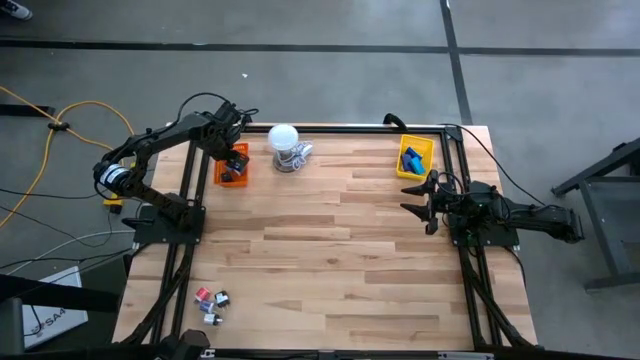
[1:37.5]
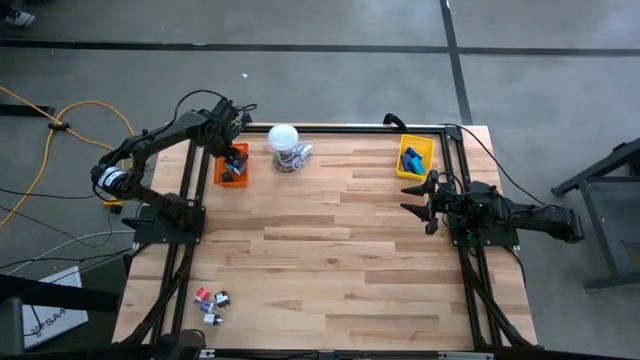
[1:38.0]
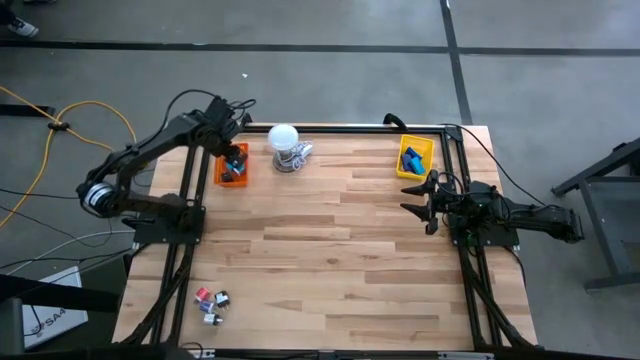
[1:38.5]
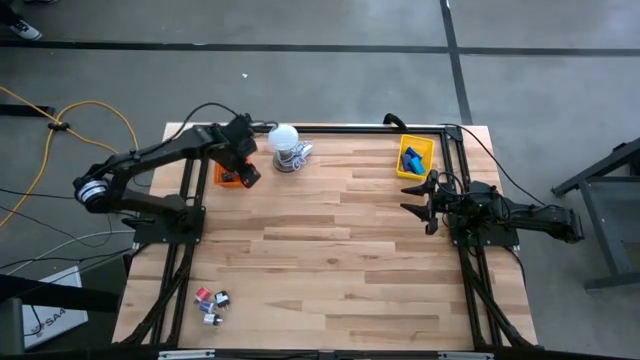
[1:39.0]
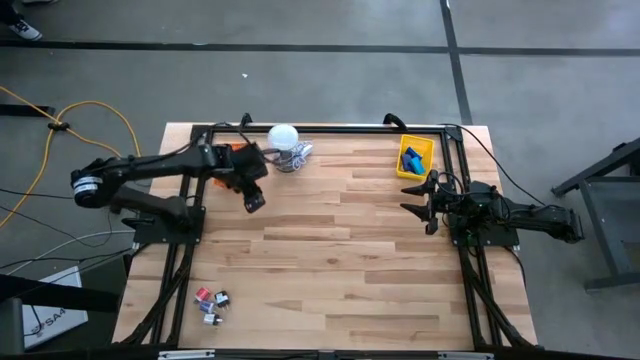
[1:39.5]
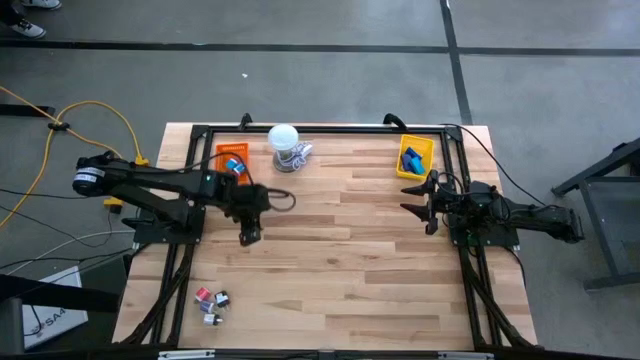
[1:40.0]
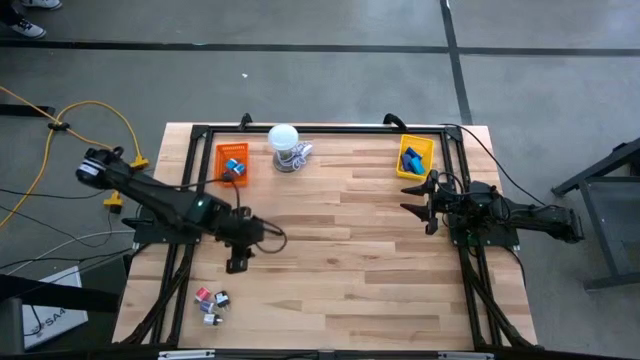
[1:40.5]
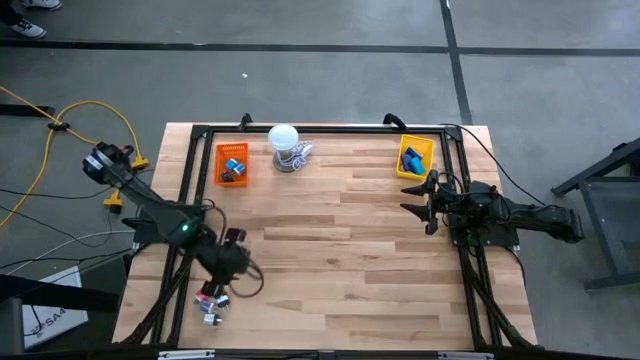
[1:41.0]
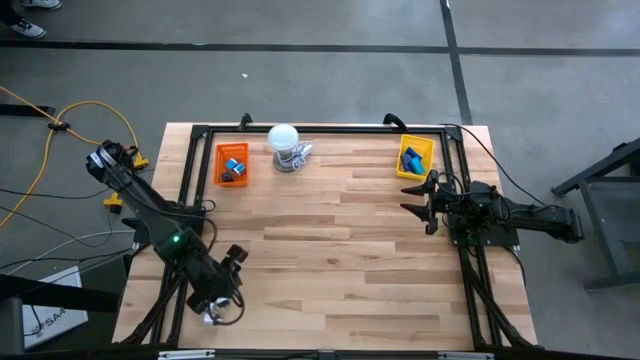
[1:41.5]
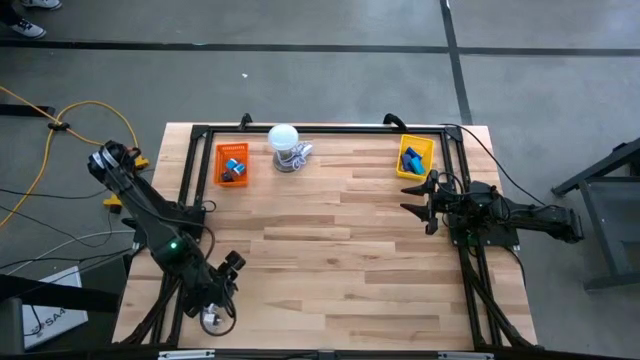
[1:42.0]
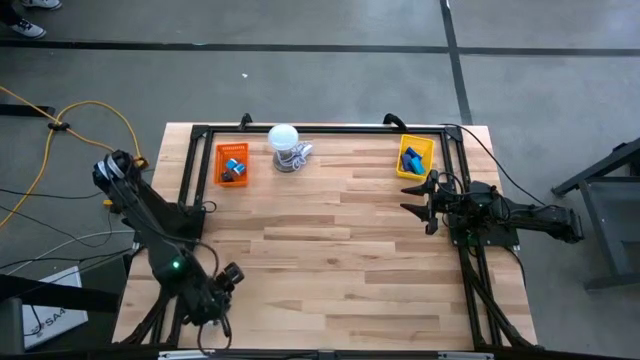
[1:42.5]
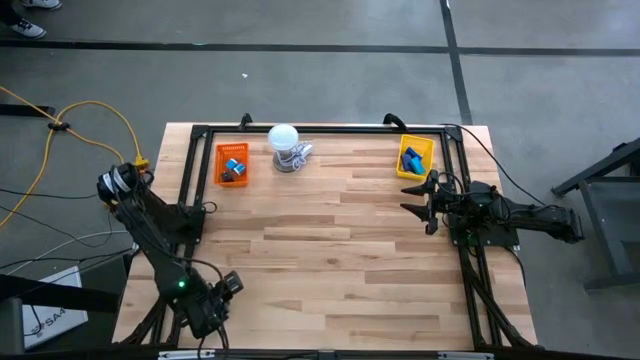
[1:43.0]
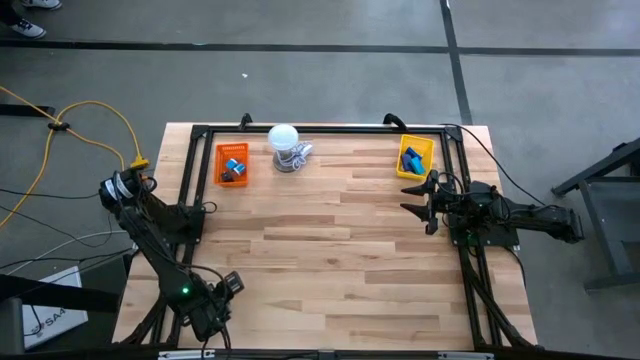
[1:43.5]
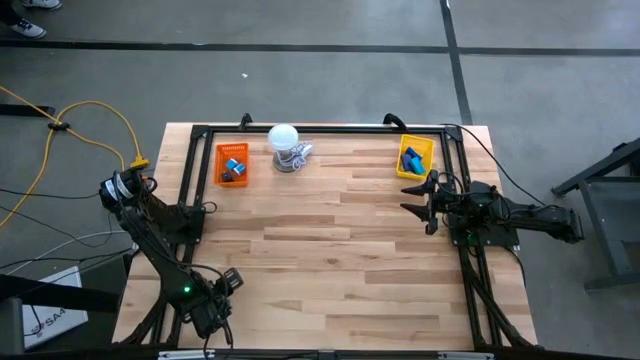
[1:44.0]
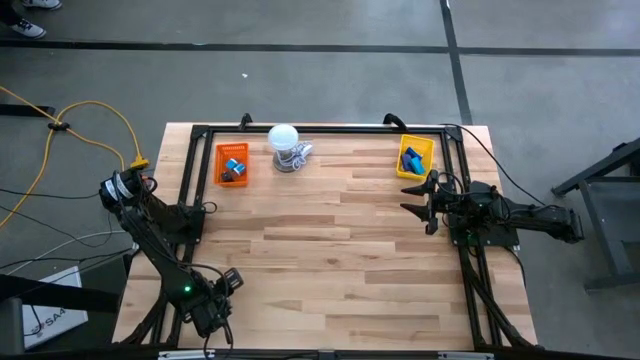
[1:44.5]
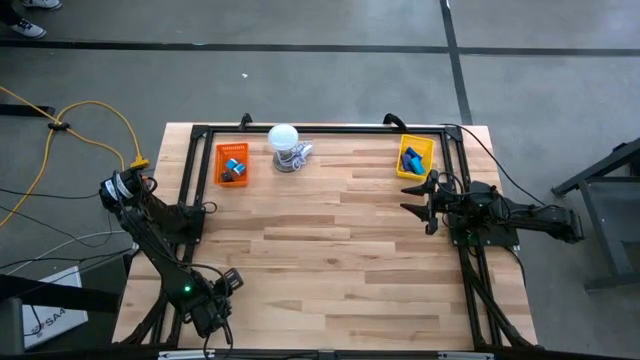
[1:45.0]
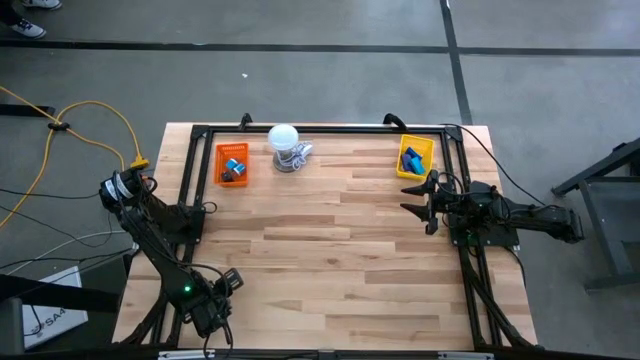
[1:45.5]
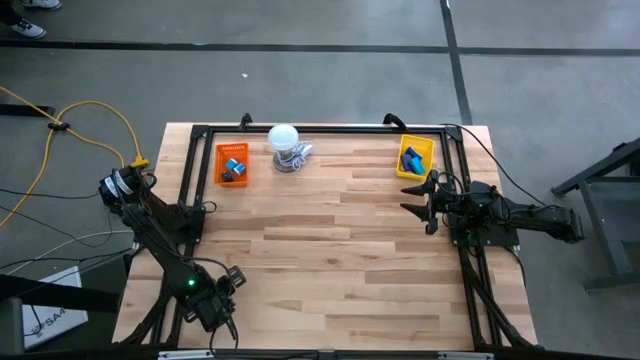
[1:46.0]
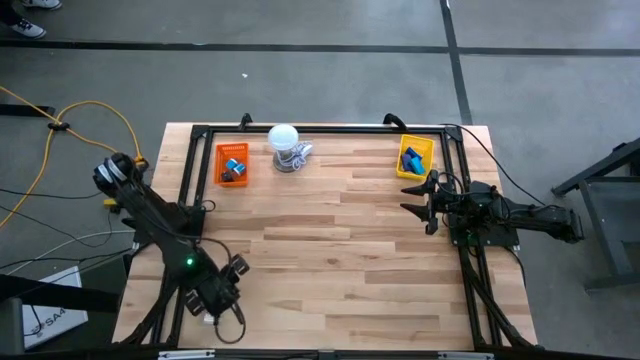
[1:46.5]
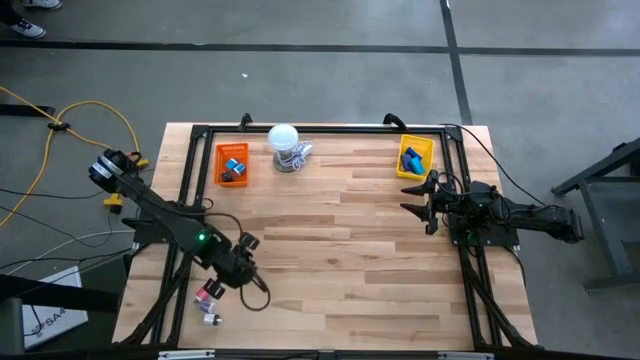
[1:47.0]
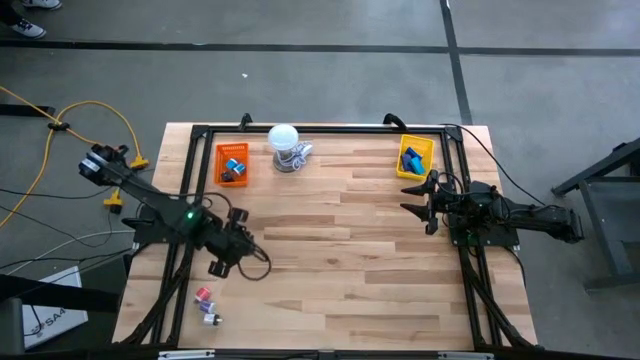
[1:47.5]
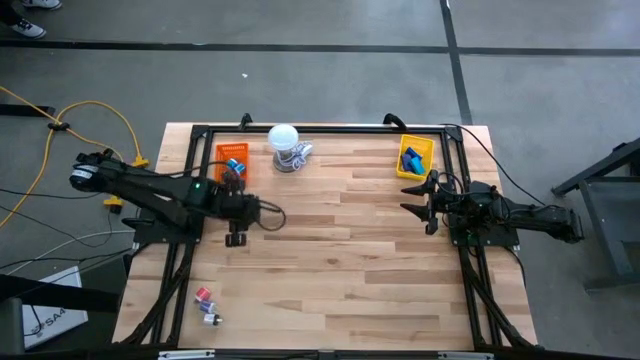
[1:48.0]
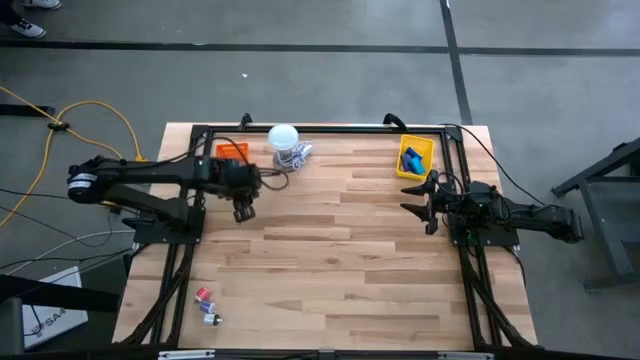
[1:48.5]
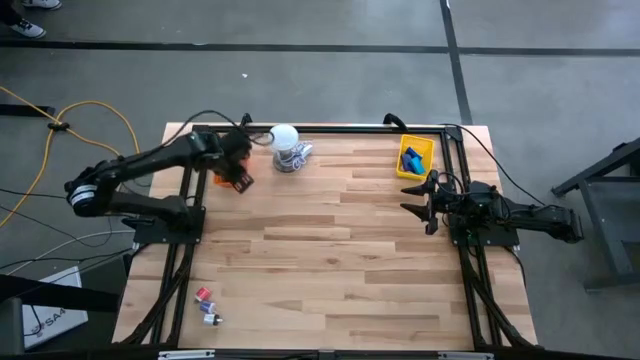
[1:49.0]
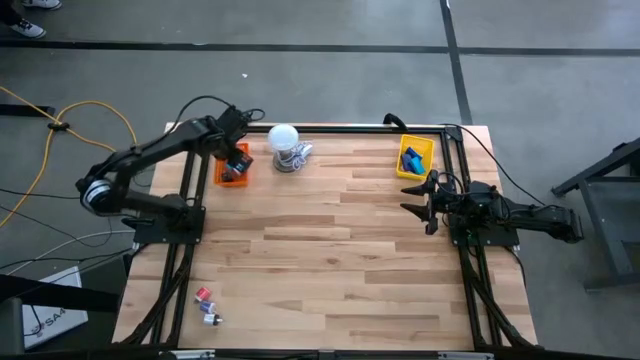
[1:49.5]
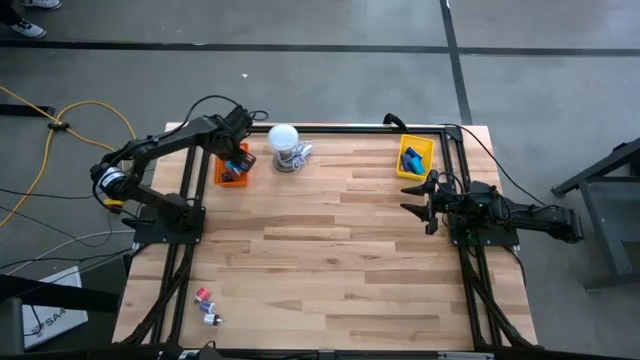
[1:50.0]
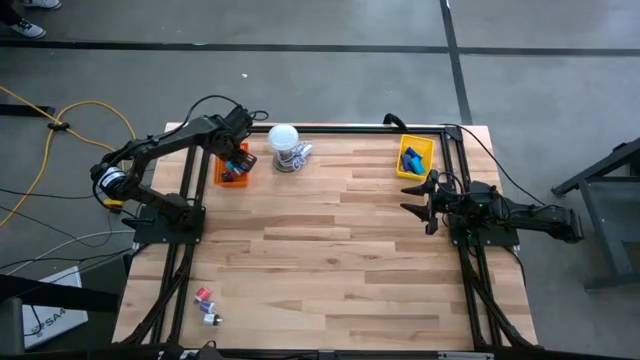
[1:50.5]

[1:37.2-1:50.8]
Task: Pick & Place Office items
Put the black charger adapter into the orange basket

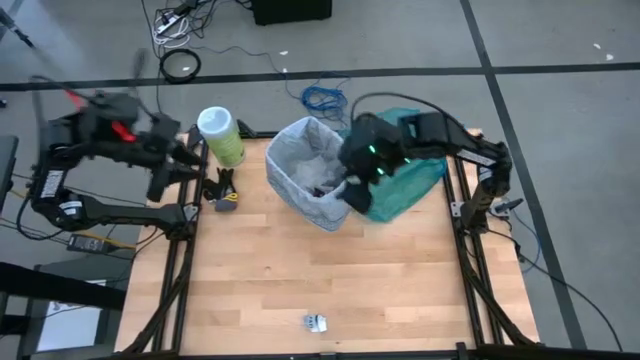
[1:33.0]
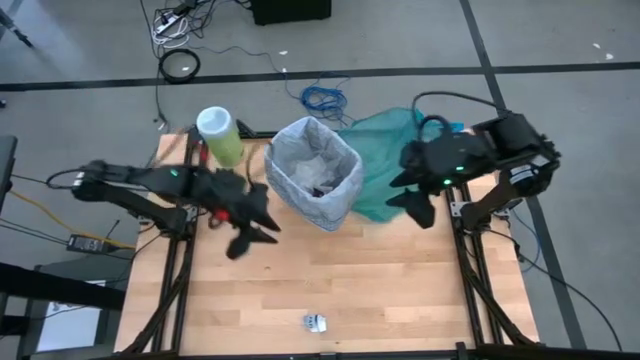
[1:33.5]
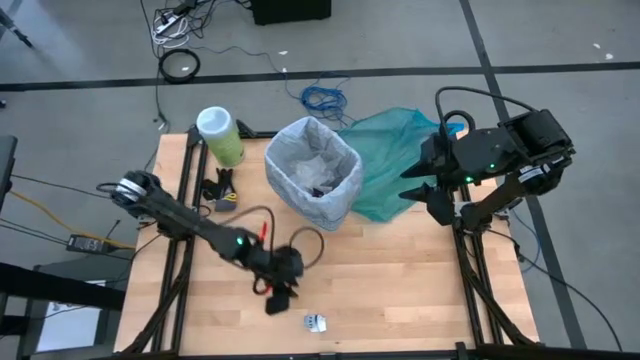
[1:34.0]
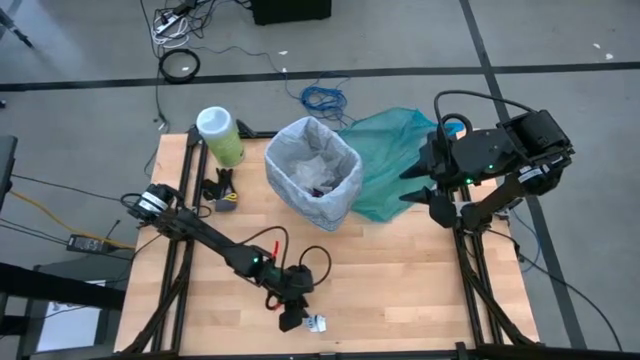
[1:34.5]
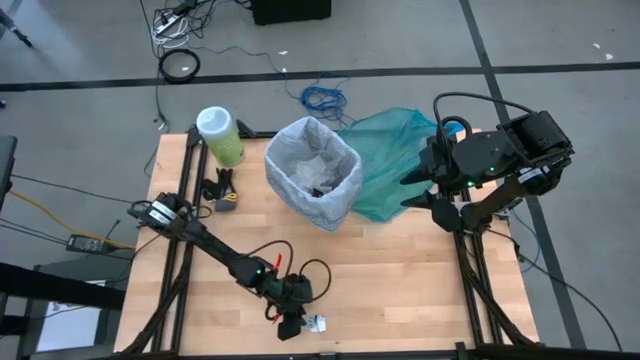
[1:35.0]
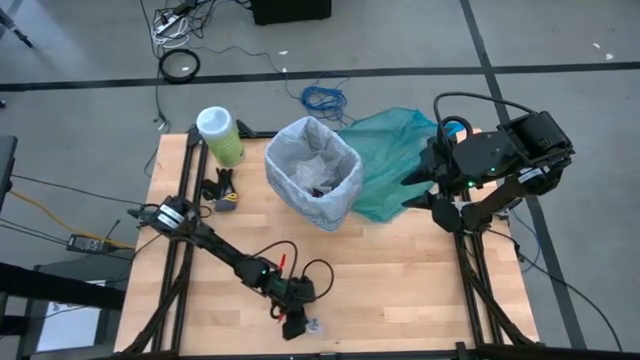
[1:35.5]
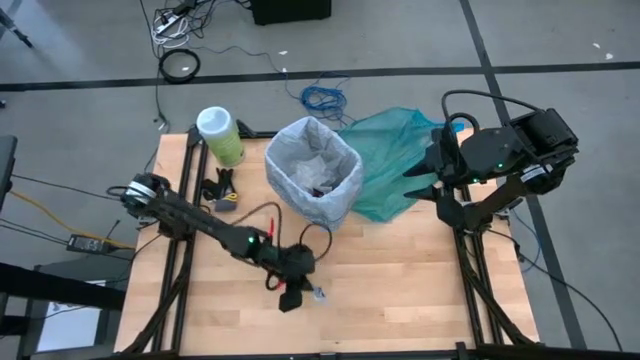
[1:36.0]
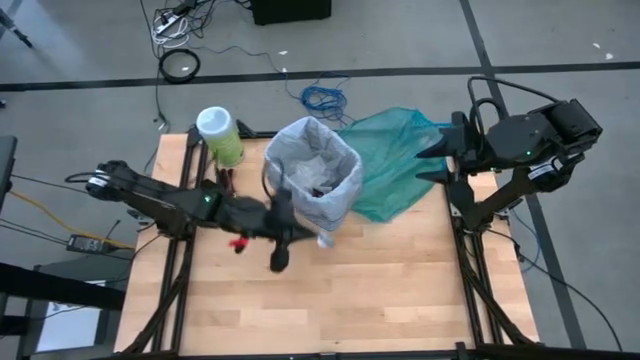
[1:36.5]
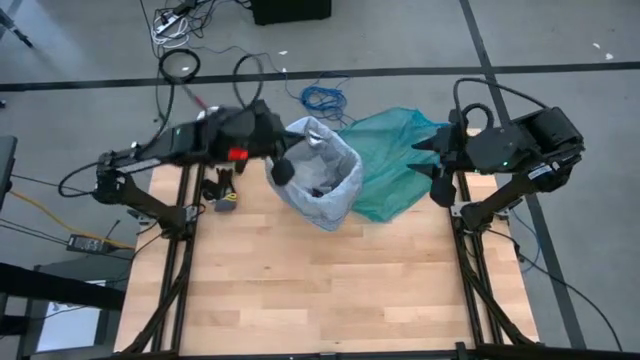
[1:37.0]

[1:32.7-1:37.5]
Task: place trash/remove bag and relplace
Put the dark blue paper into the trash bin
